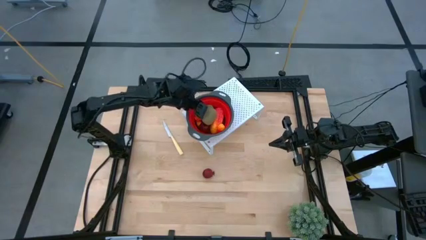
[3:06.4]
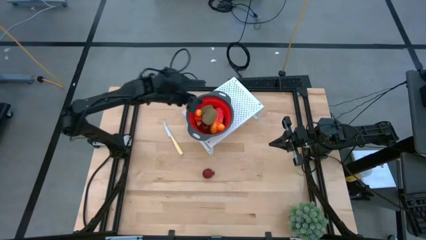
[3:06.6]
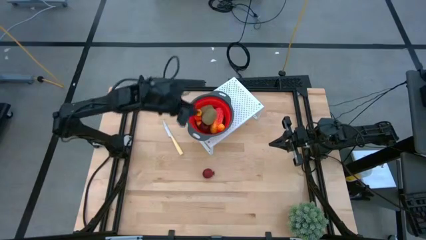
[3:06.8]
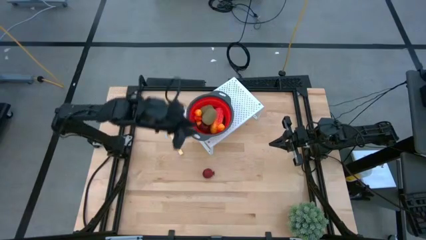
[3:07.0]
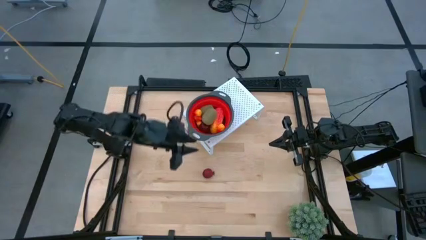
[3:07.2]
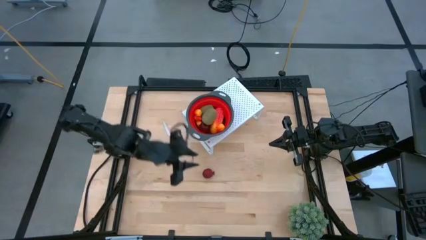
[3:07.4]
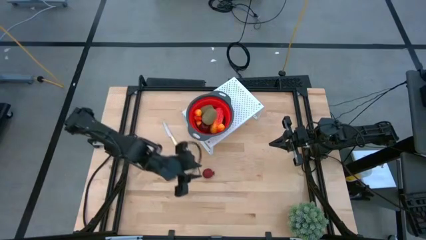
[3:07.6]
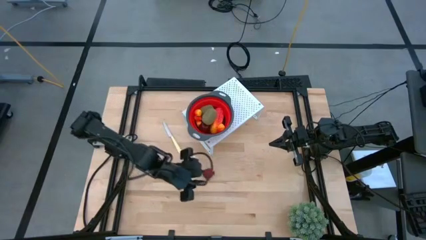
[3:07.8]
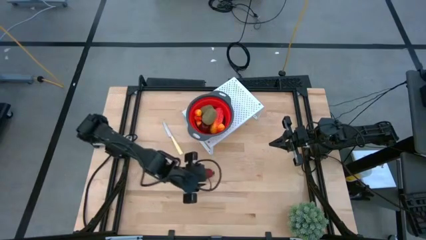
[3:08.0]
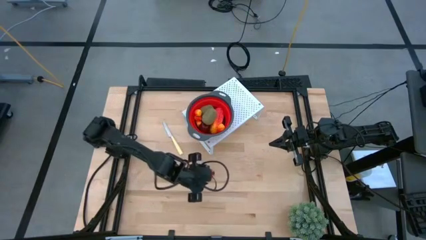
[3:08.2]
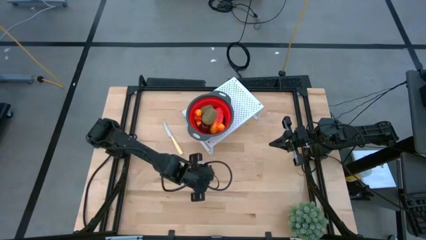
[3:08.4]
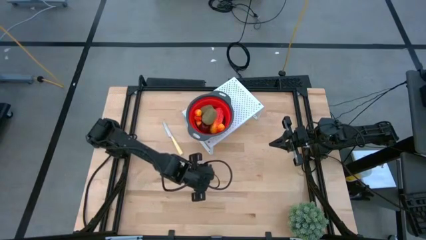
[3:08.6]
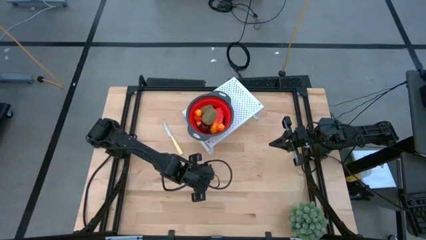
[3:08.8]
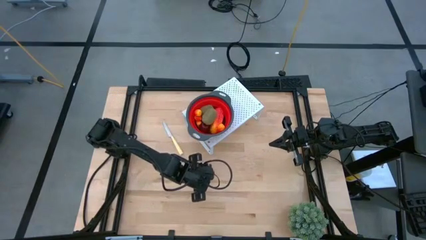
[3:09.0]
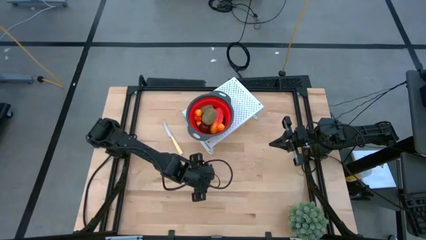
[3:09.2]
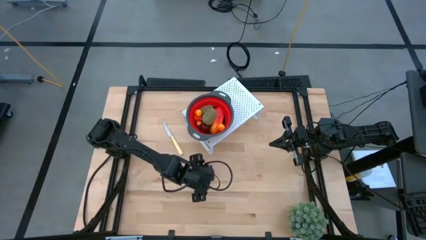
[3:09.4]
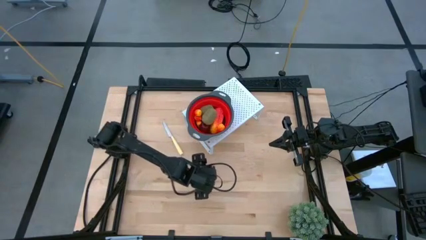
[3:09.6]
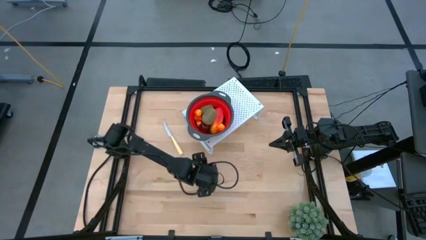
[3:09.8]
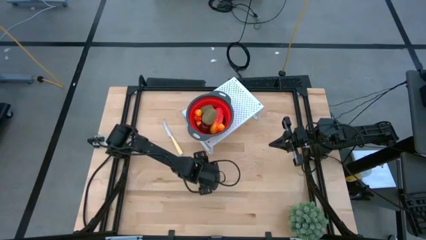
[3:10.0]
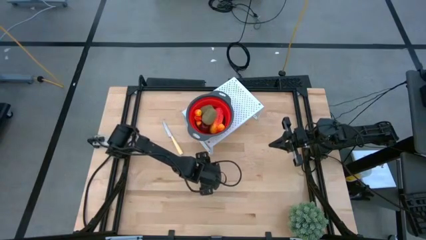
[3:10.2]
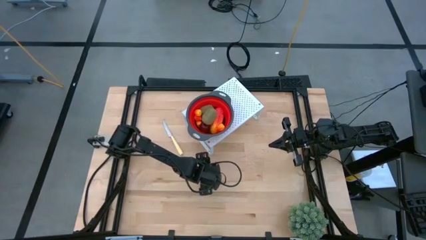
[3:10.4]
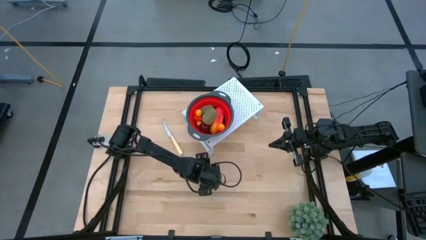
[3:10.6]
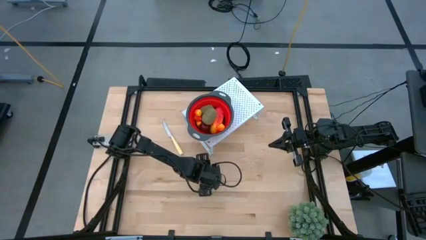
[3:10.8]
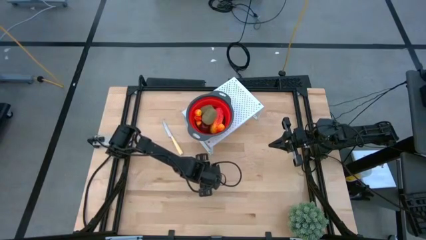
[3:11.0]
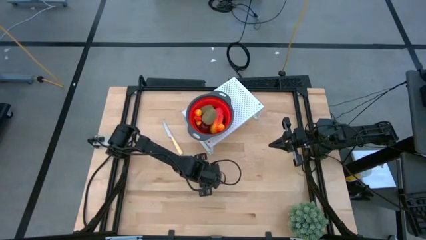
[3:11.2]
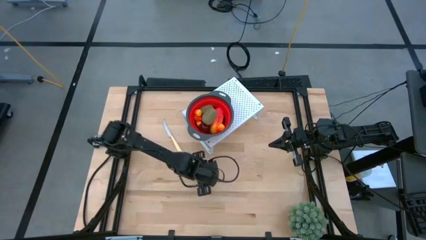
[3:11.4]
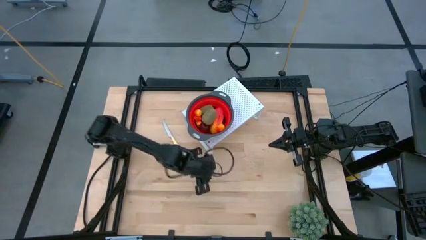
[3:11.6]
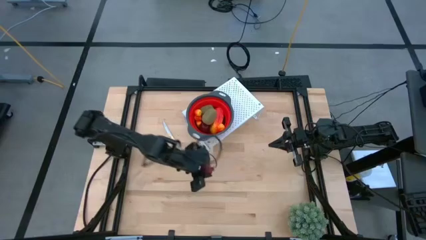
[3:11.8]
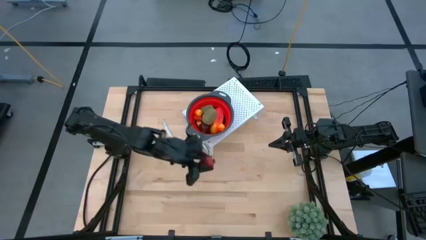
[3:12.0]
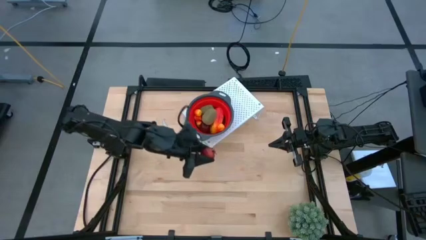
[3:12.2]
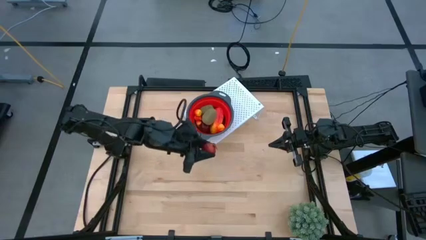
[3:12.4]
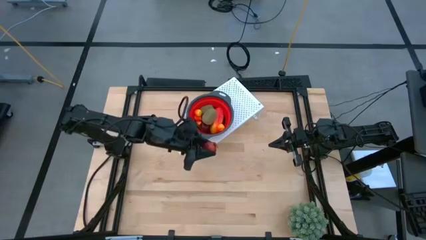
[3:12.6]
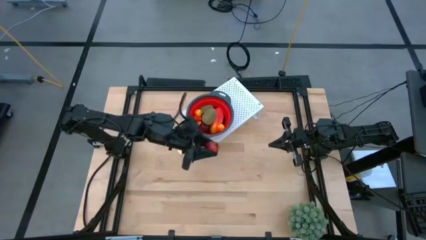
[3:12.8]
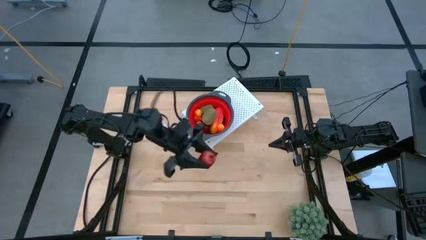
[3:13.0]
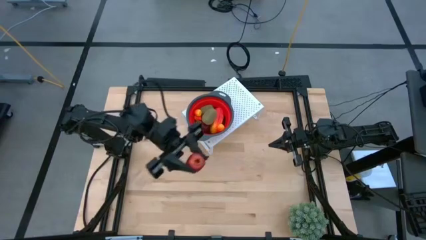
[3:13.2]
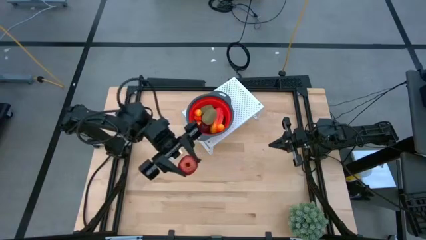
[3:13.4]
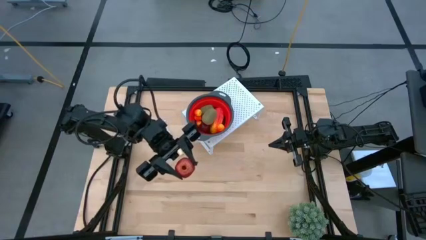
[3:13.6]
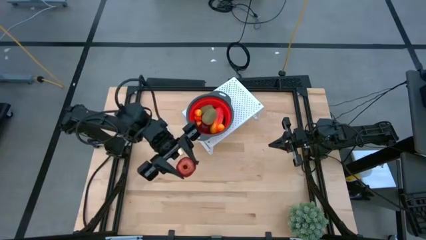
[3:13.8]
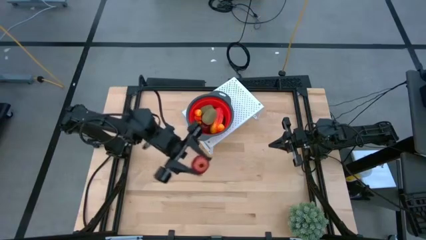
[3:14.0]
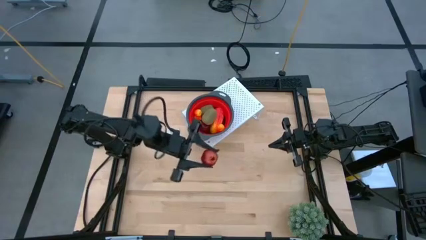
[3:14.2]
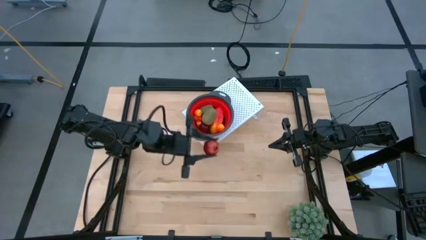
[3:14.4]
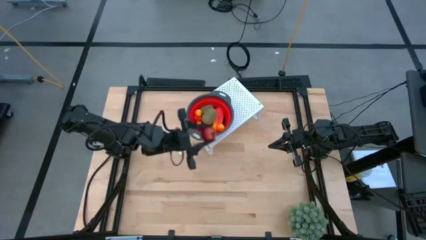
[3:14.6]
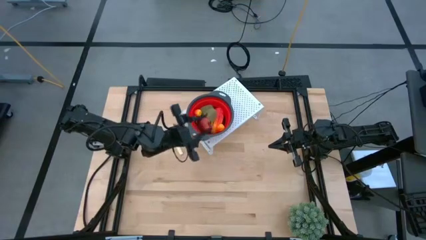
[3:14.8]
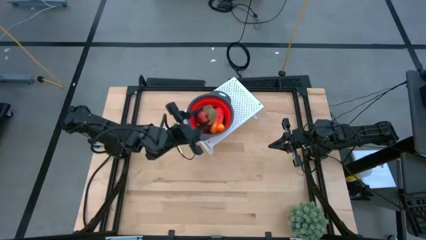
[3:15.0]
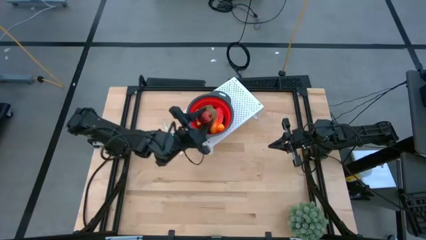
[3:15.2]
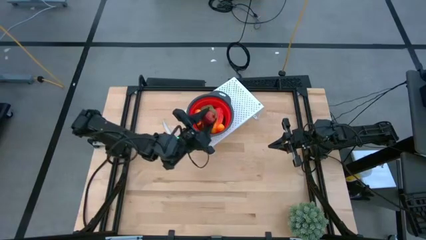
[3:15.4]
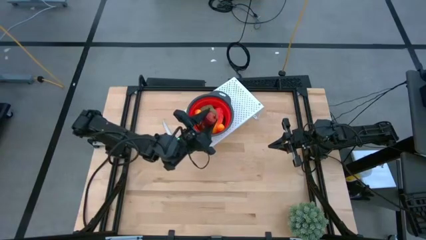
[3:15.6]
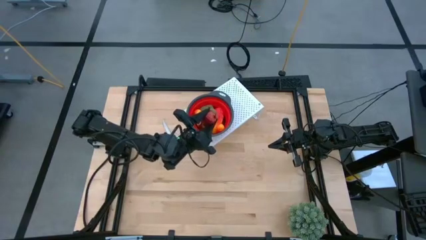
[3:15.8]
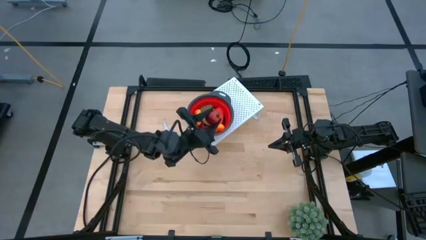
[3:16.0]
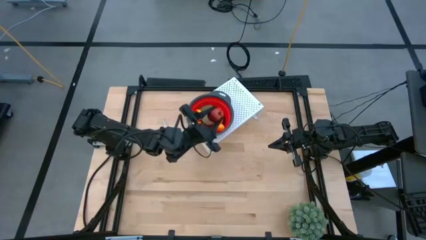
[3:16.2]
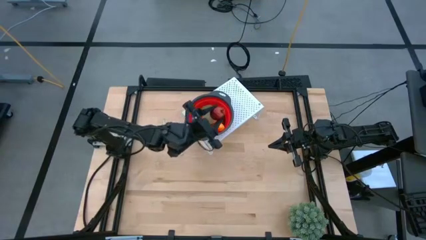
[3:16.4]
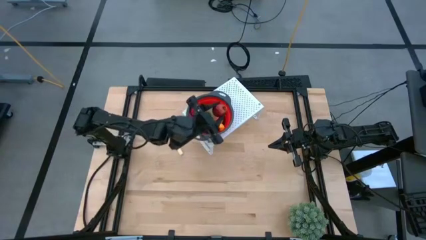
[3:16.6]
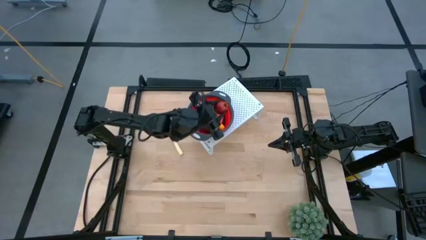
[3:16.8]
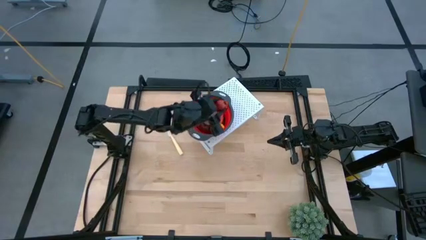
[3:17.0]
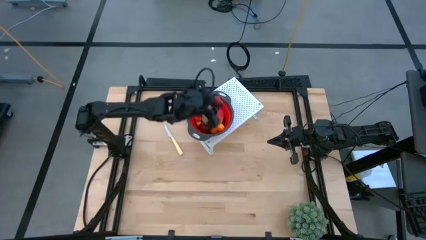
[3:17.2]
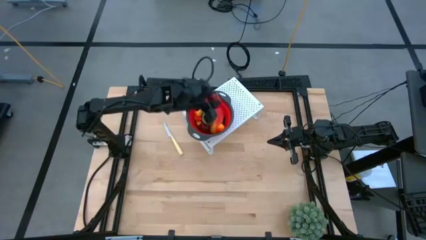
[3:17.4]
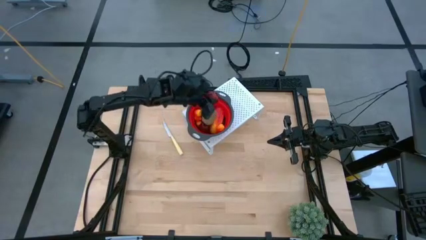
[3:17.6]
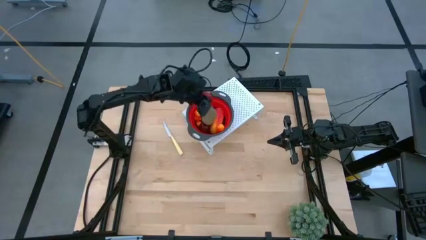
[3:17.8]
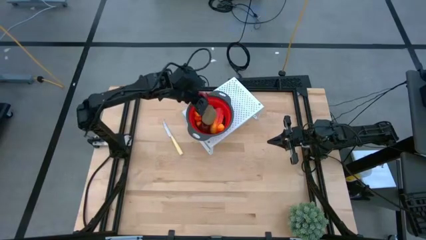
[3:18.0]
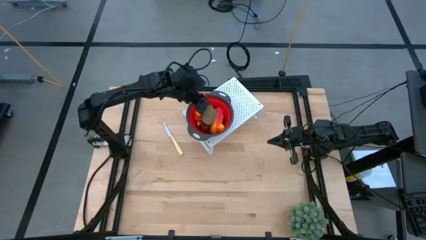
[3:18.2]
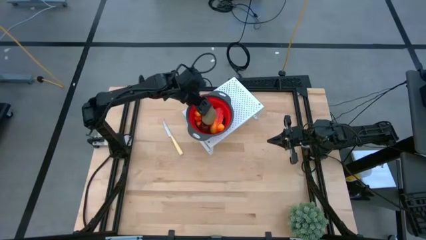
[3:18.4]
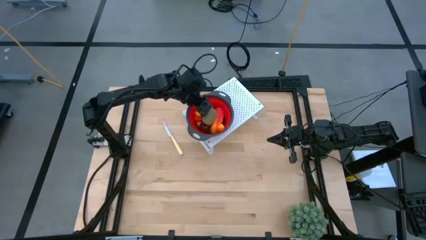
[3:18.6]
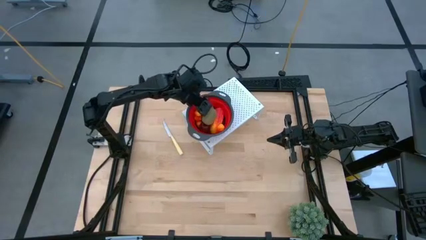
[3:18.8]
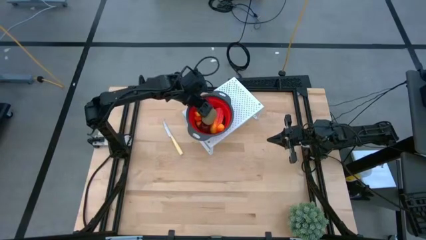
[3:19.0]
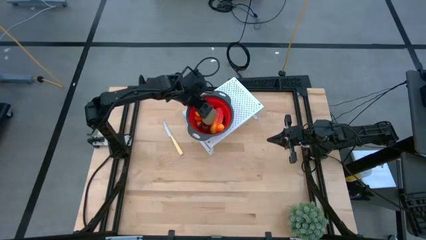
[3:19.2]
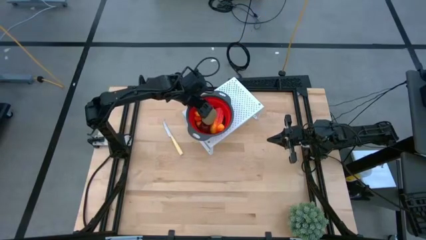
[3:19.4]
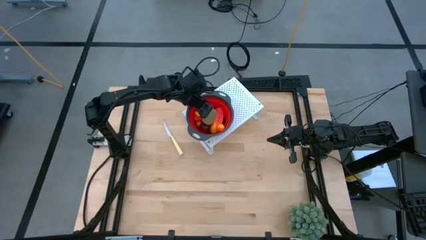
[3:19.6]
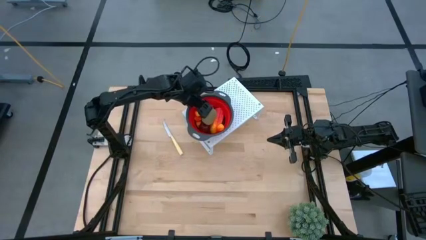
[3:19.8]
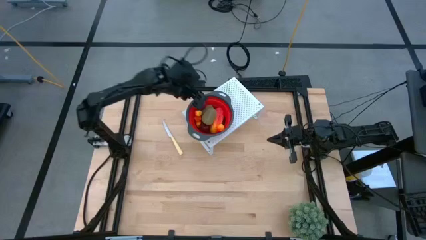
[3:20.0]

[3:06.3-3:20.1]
Task: Pick & Place Fruit
Put the pomegranate into the red strainer bowl on the shelf

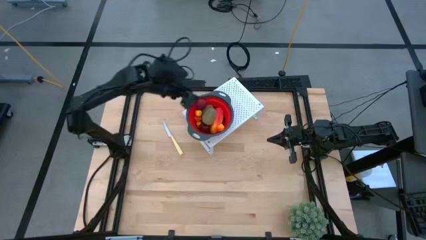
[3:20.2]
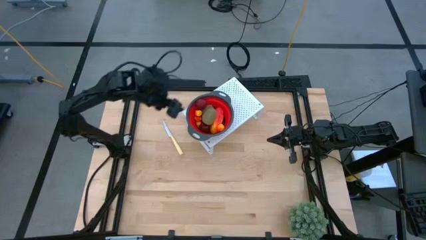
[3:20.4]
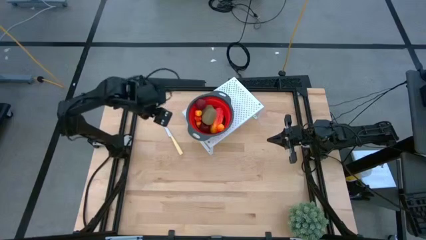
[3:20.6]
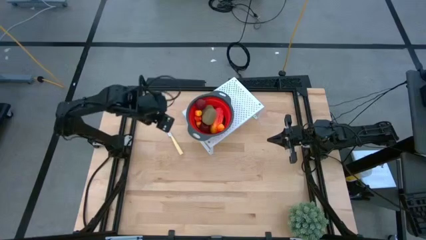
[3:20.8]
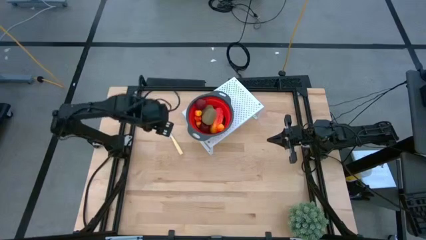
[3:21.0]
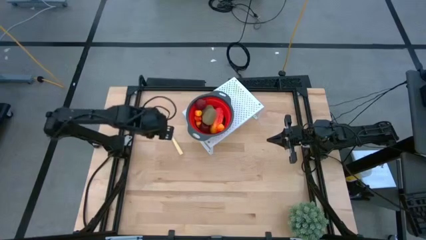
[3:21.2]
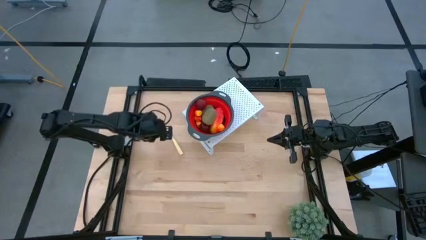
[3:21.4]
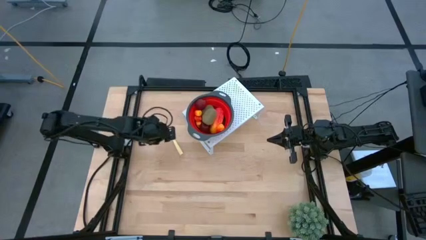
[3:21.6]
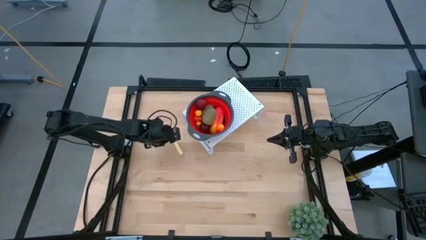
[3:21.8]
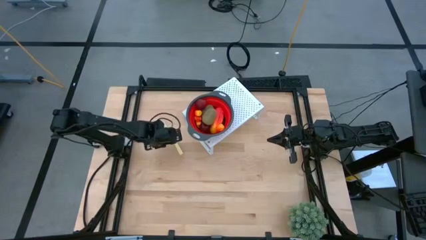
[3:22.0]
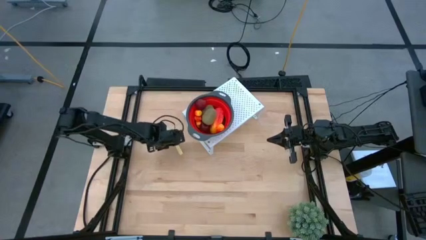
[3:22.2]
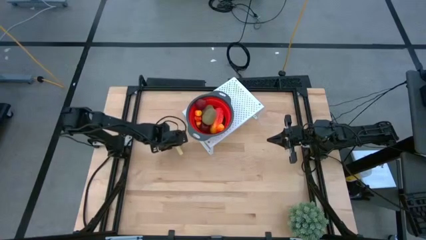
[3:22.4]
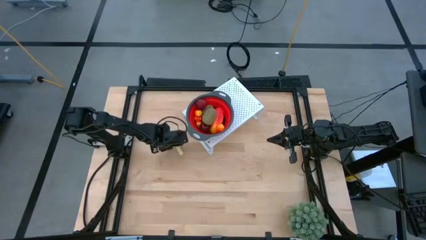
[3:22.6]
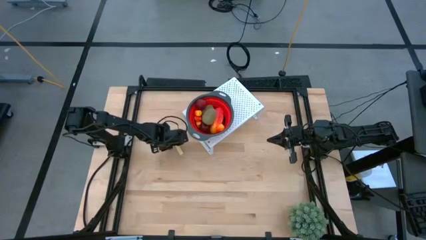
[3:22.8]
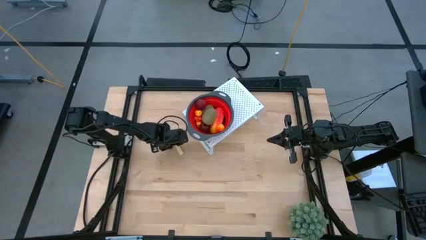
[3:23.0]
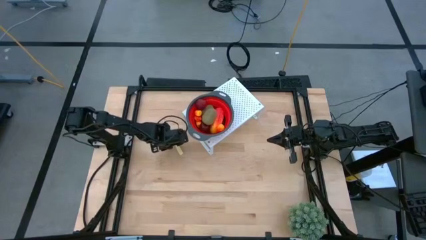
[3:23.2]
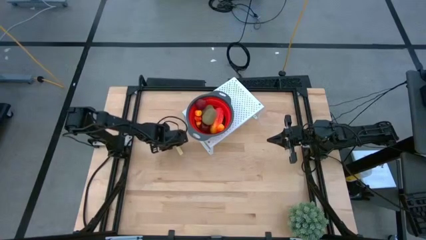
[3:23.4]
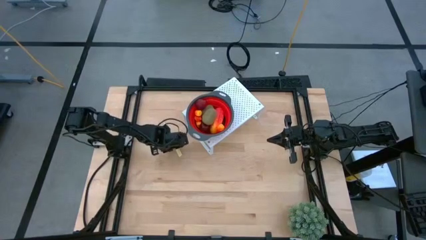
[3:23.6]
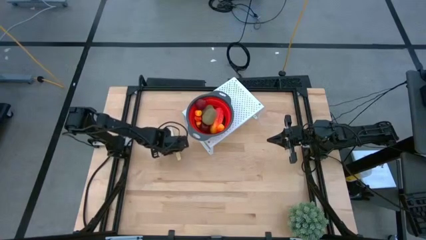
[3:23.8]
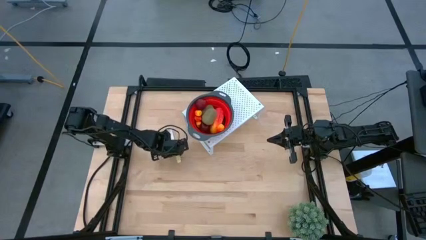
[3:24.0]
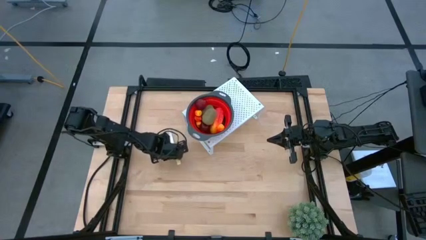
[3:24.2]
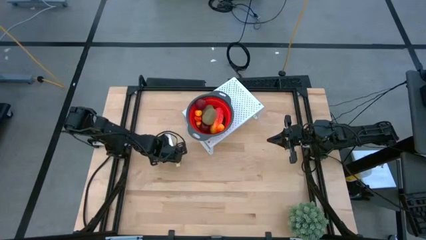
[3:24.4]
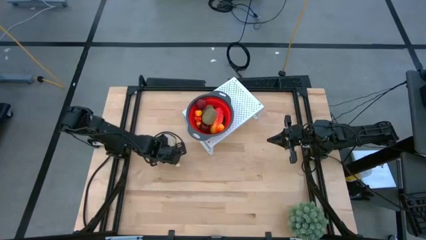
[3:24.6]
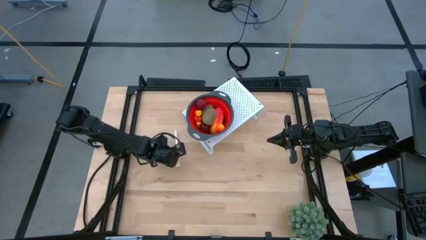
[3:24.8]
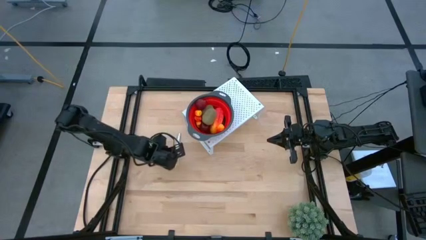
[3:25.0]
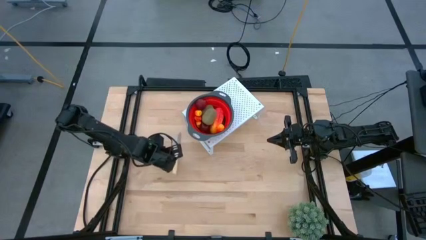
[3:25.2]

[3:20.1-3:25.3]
Put the yellow table knife on the shelf
